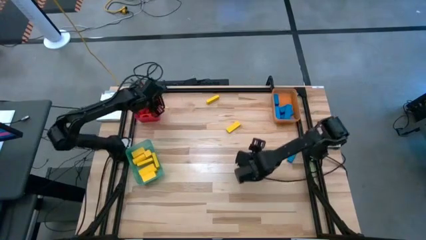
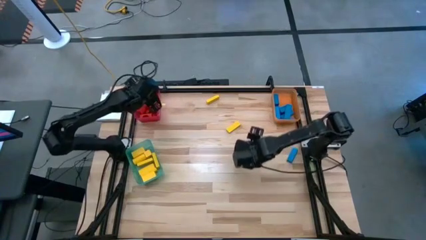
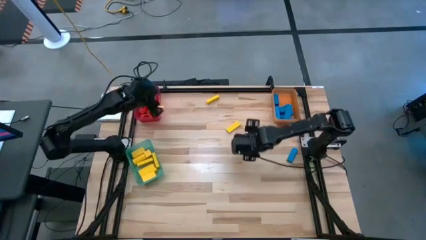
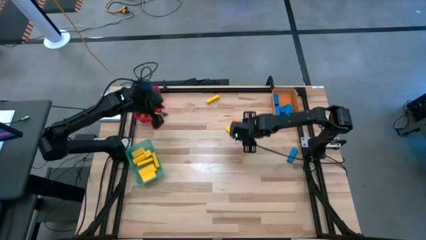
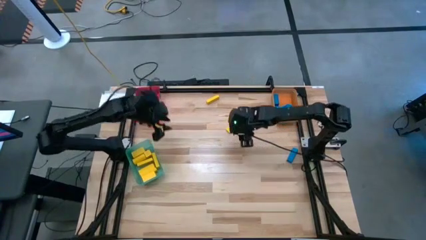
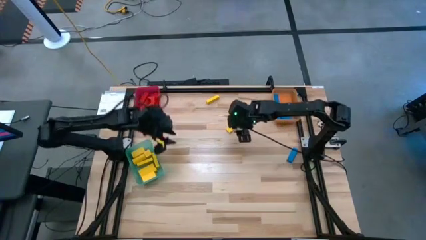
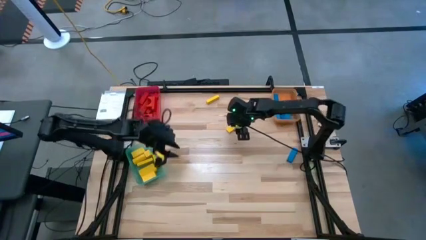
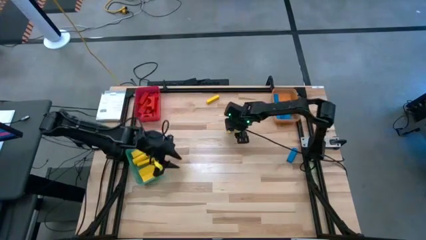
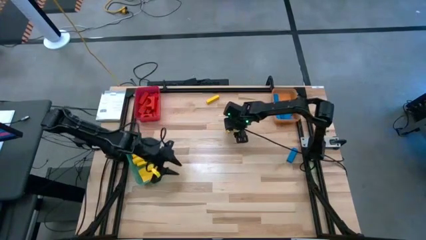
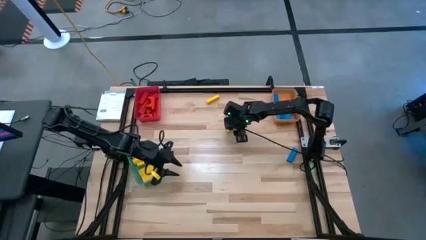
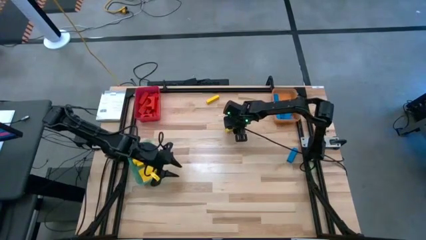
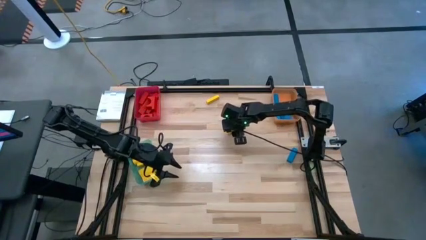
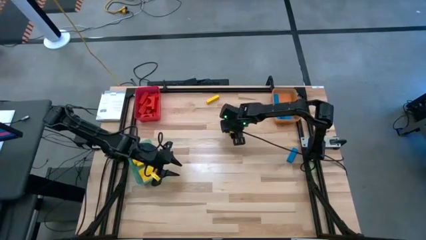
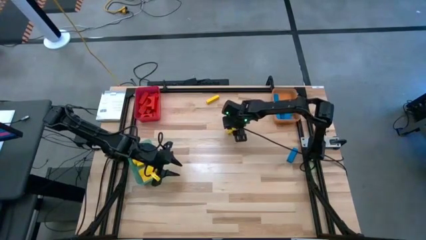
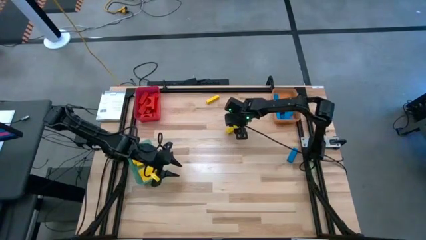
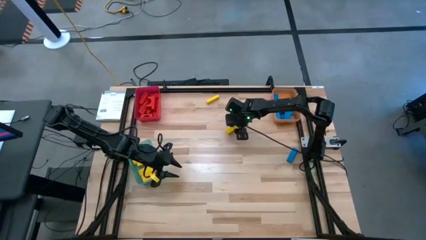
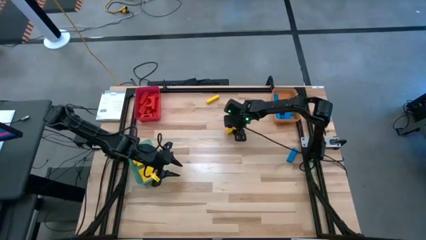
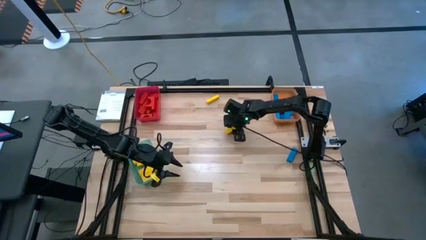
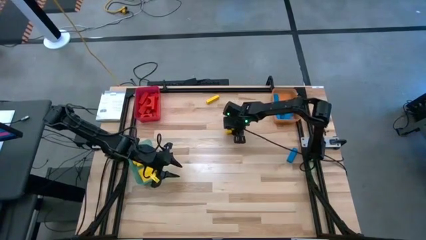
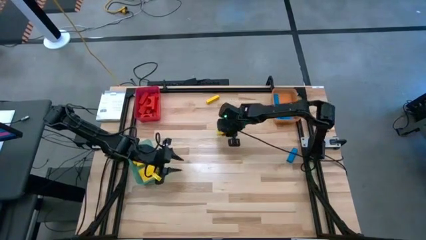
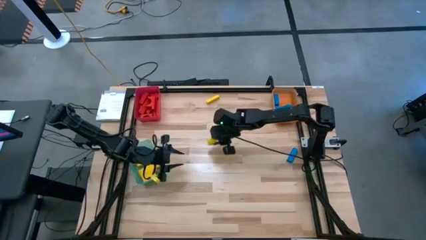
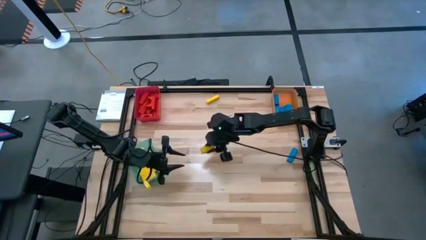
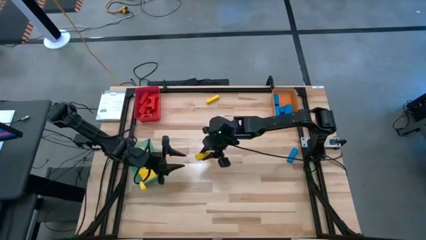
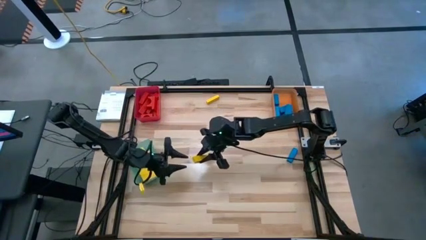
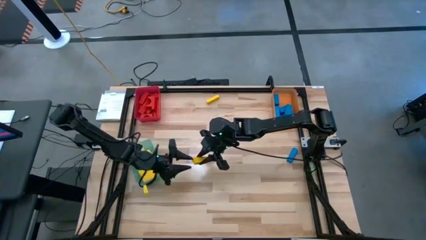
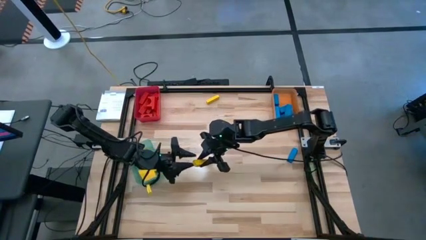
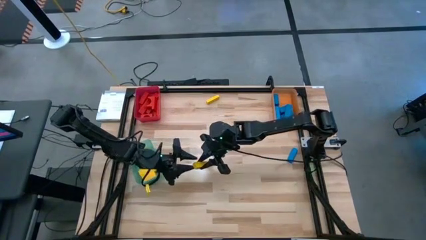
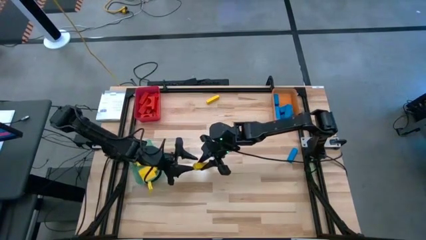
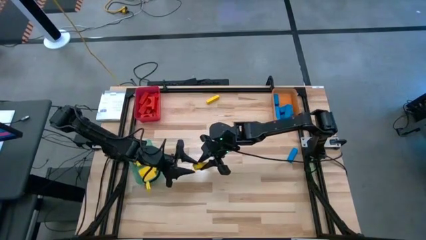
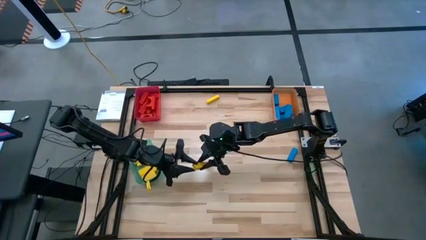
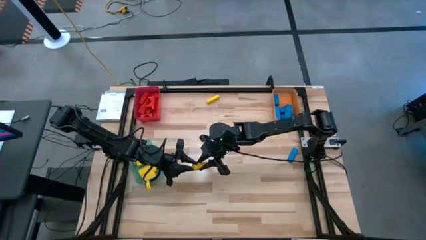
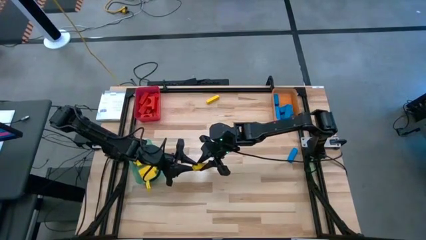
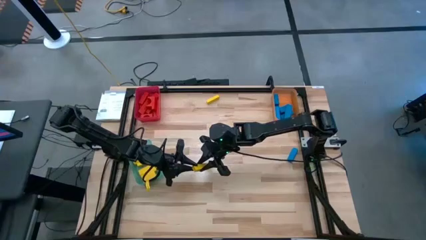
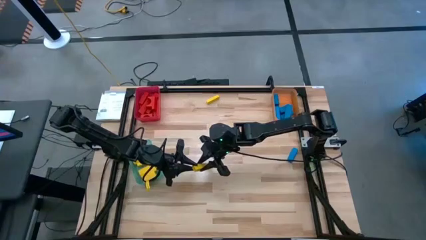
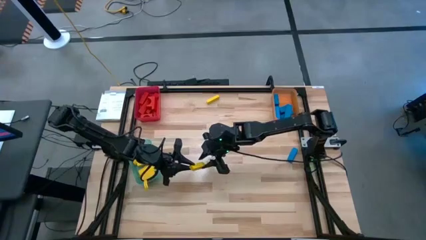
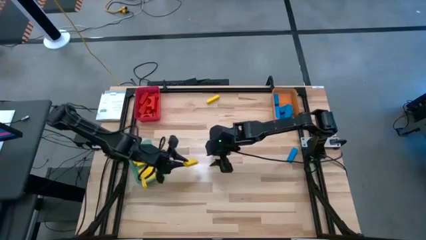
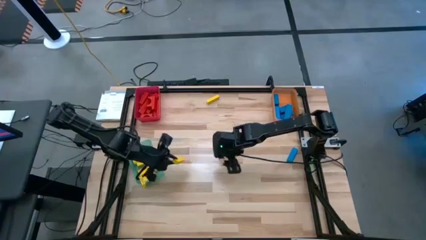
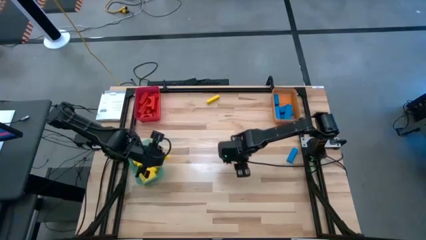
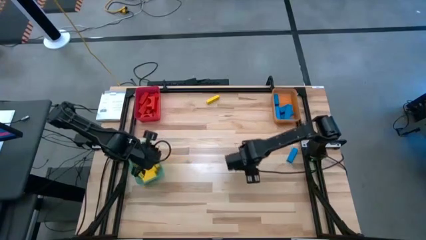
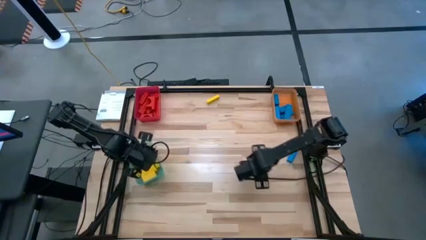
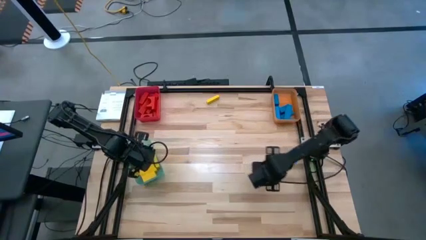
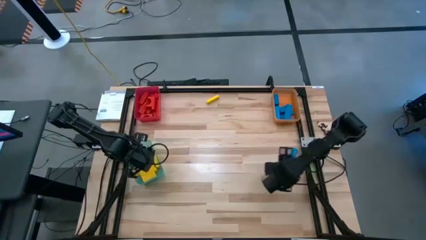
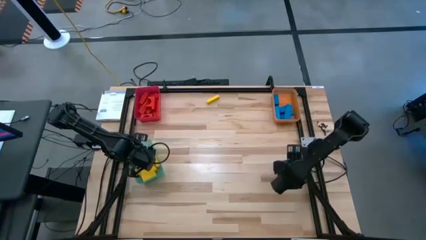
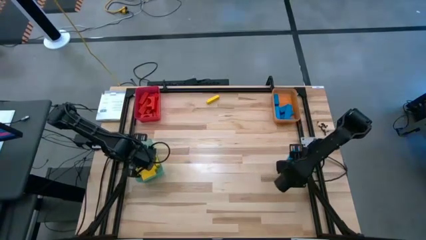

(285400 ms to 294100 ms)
Task: Sort blocks
Put the yellow block into the green bin

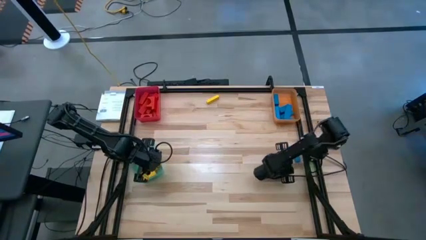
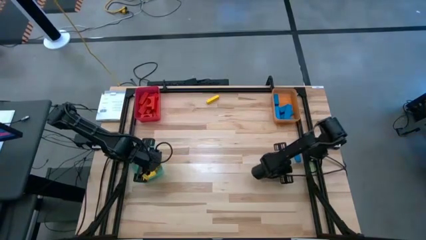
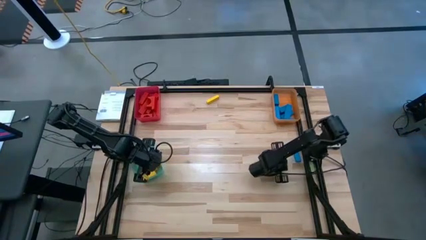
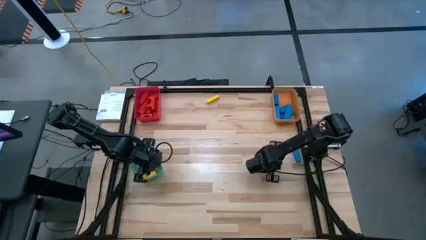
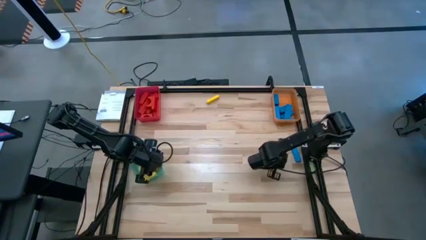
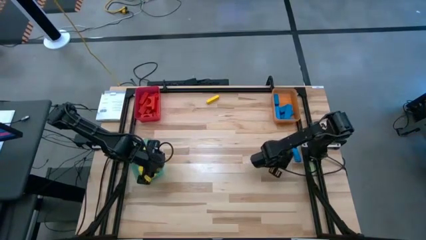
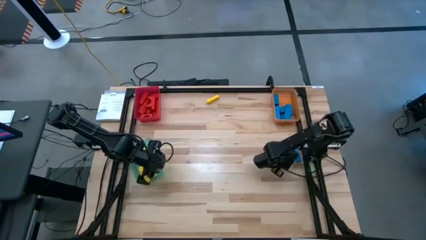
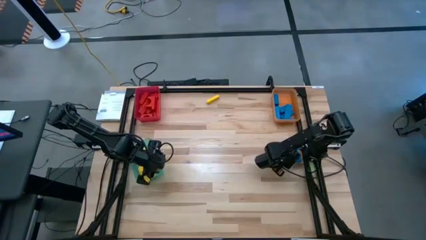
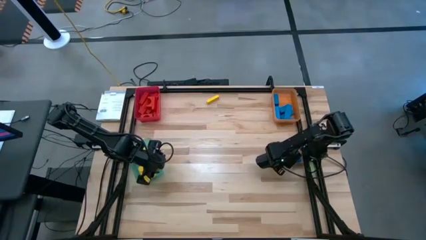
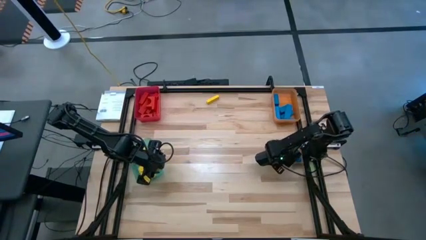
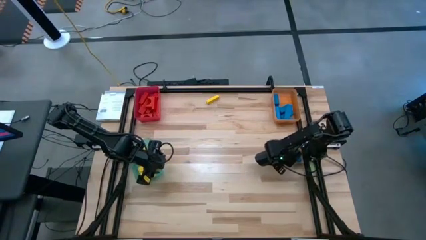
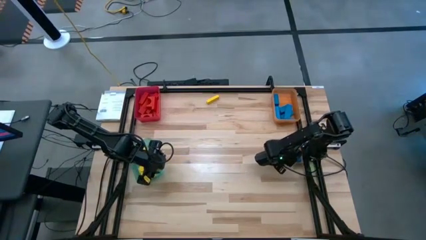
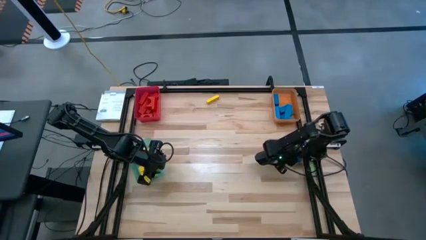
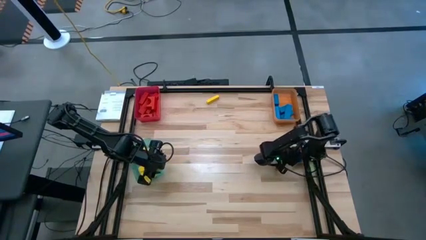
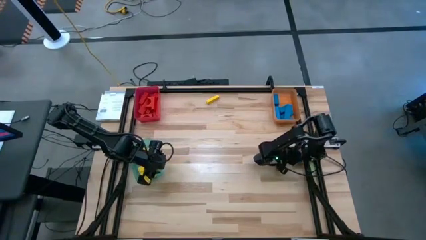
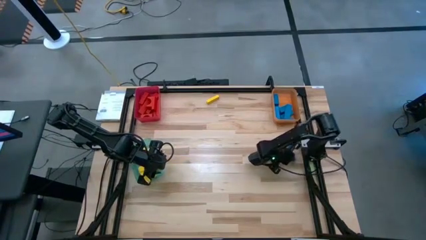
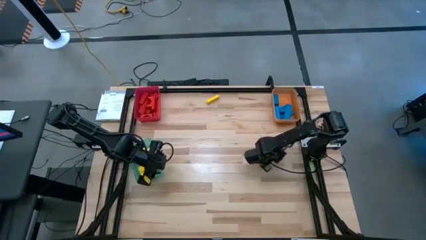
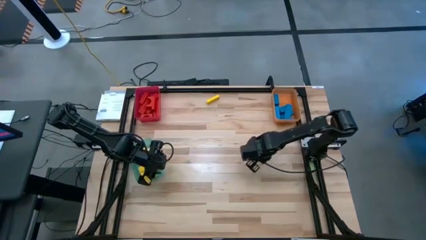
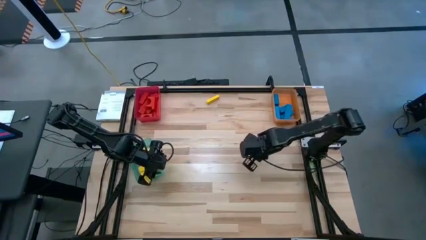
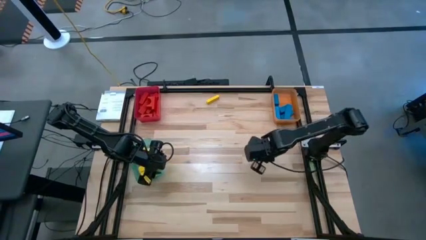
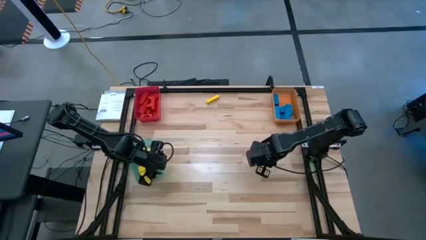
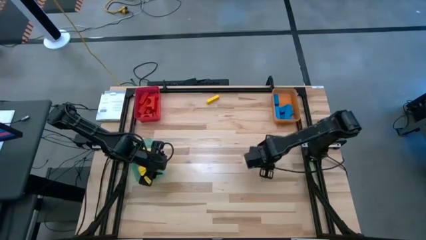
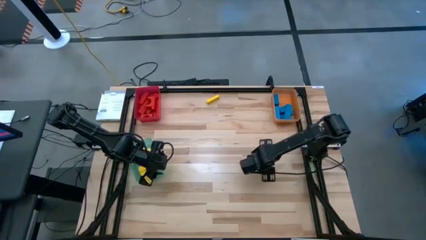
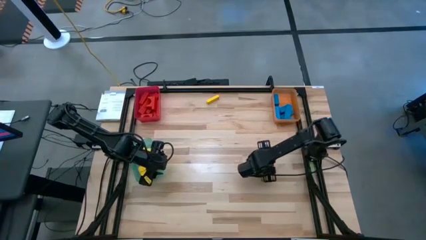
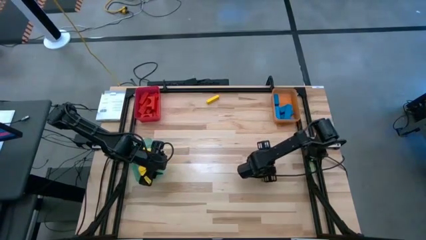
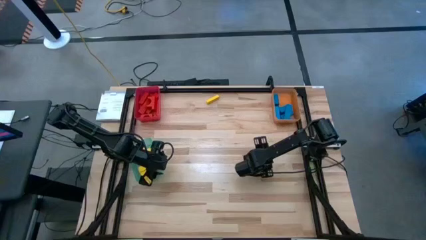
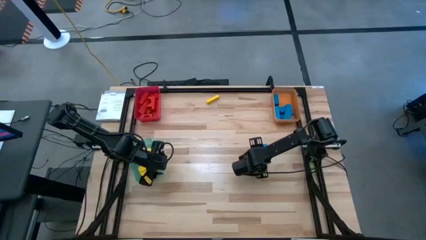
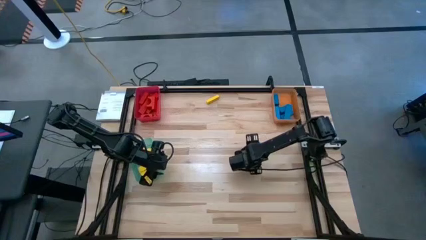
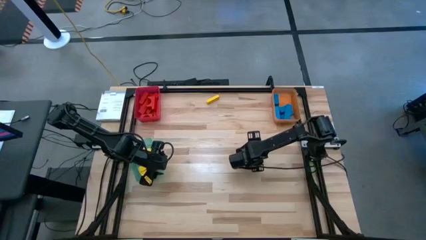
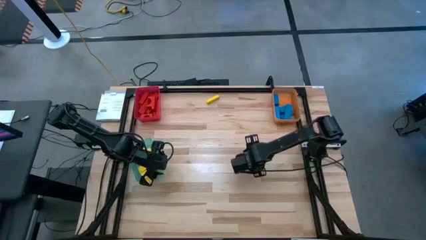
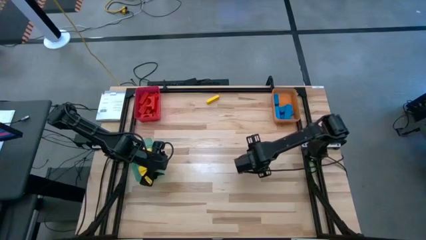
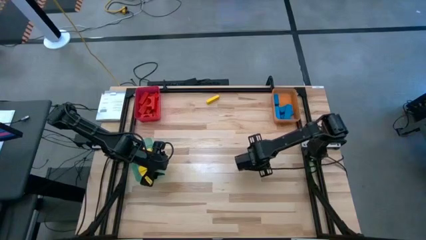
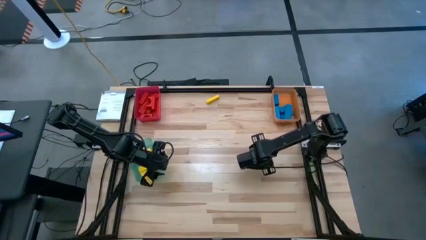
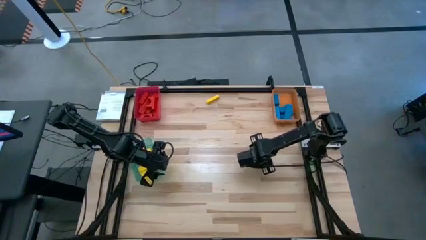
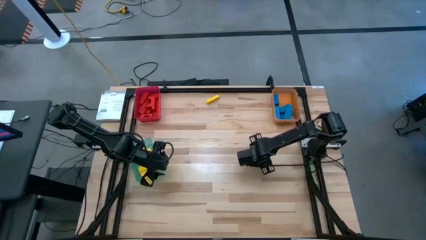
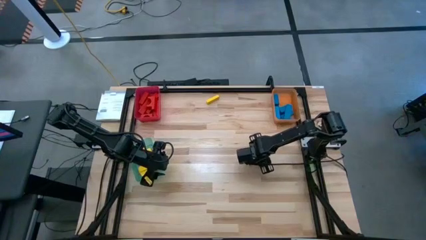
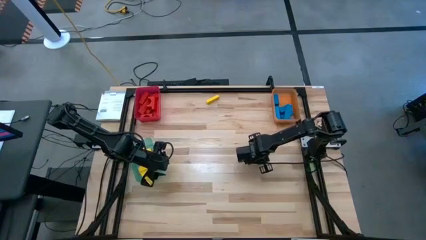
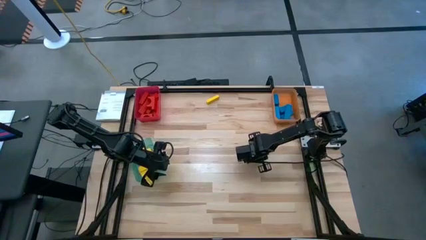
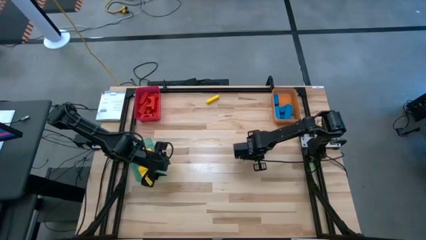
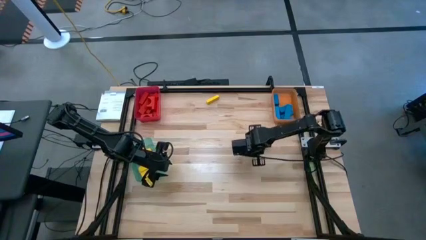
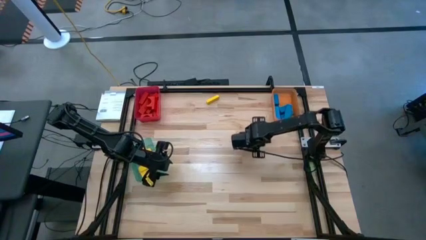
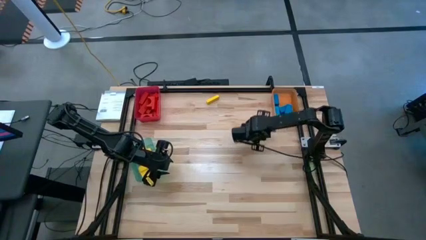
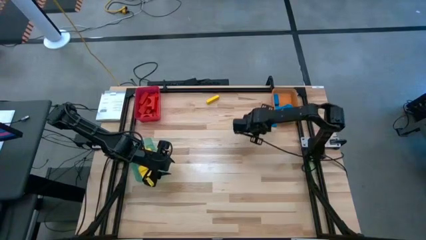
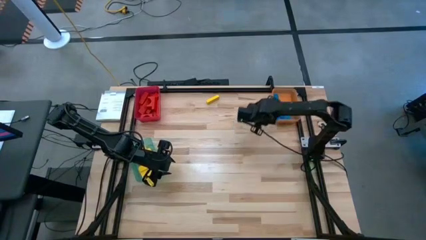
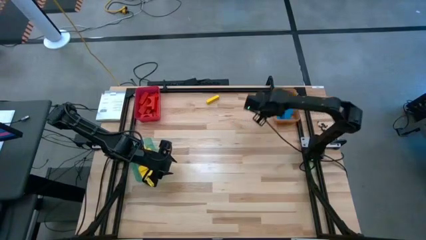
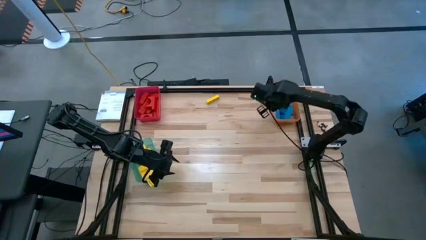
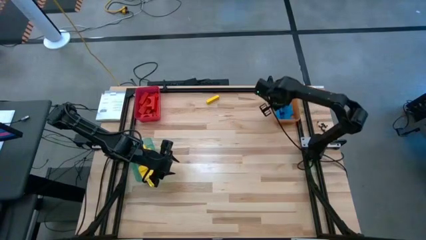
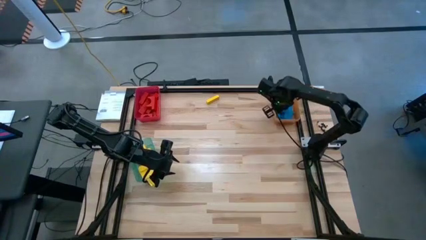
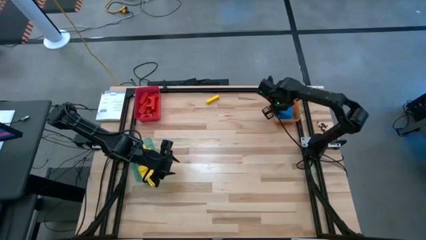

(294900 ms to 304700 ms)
Put the blue block into the orange bin
